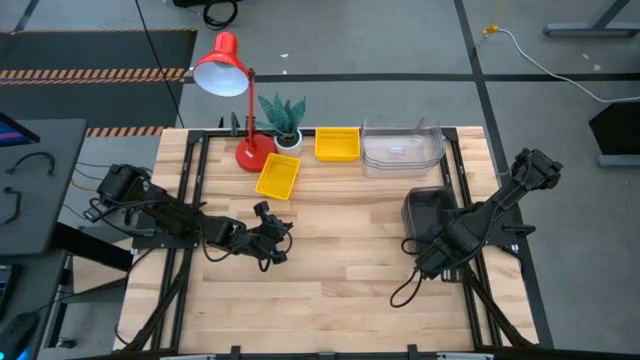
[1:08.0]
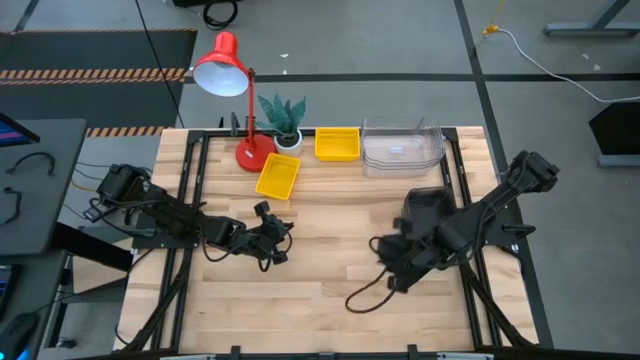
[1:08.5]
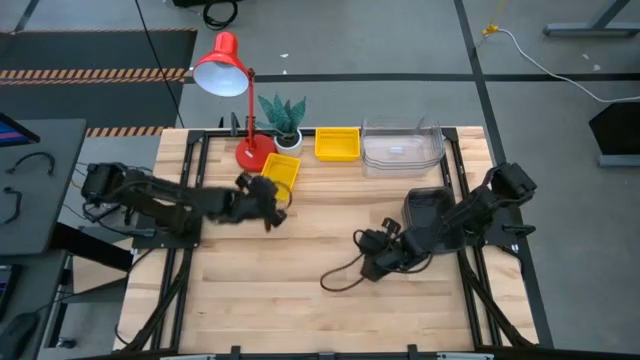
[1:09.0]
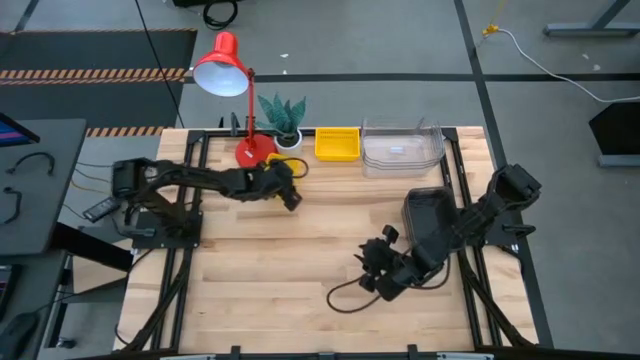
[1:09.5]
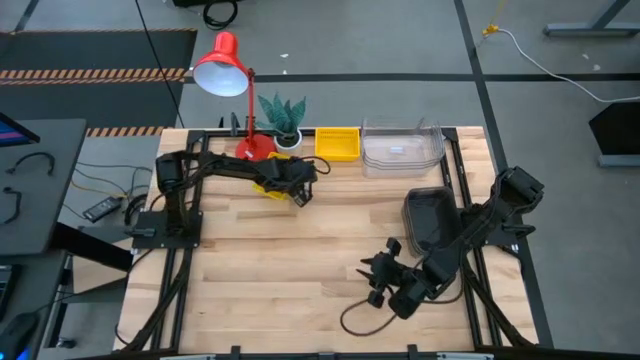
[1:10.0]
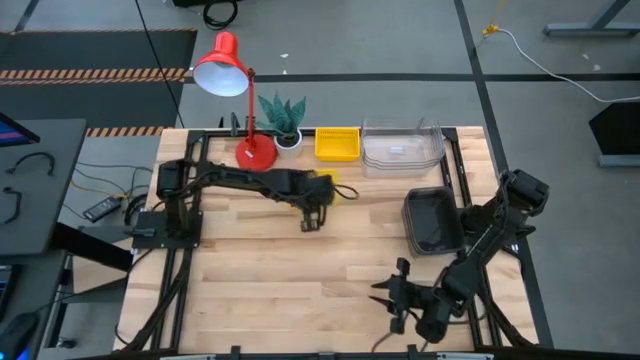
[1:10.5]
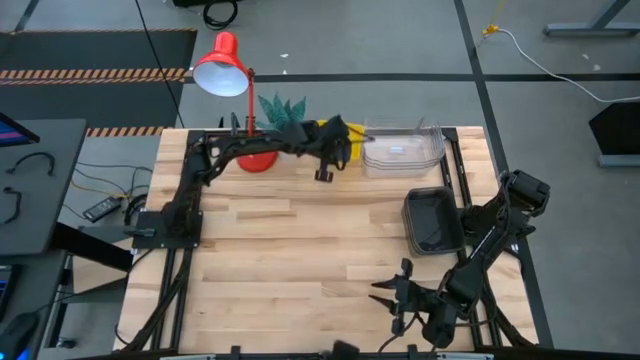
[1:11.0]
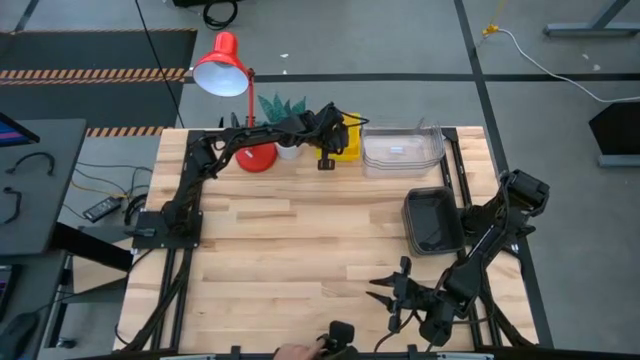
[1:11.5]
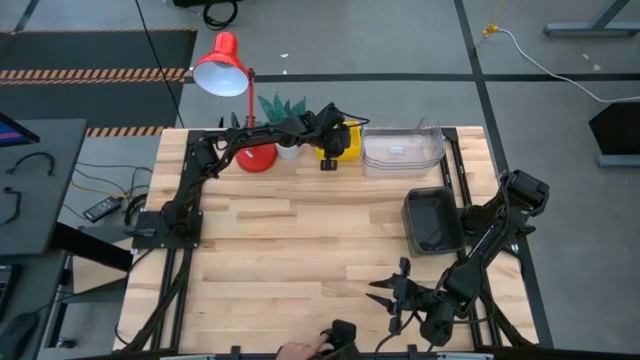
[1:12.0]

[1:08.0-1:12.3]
Stack the bottom yellow bin on top of the top yellow bins

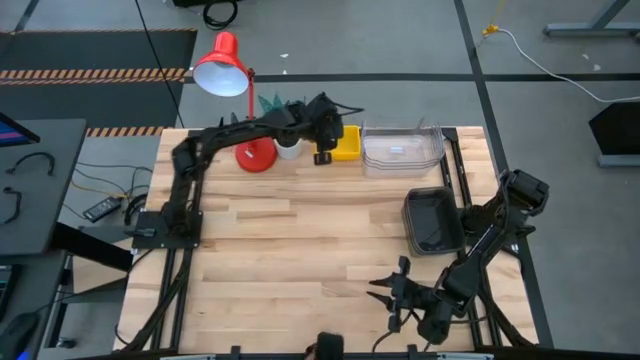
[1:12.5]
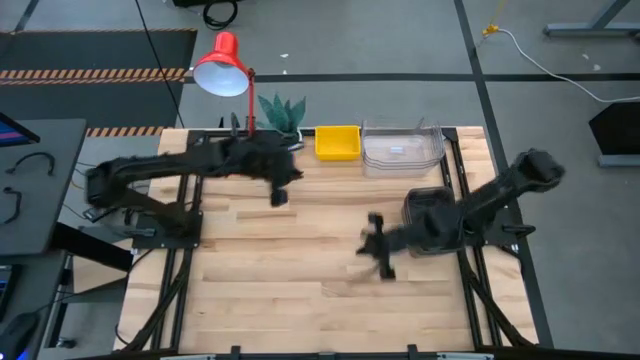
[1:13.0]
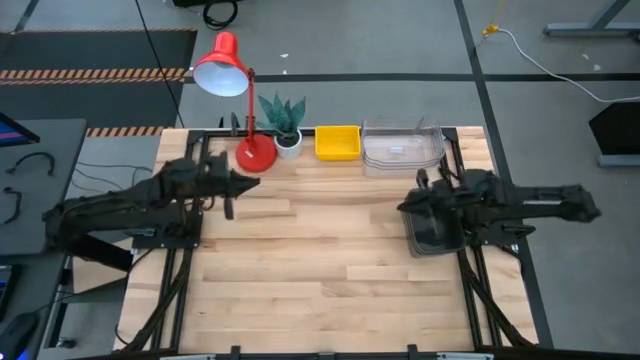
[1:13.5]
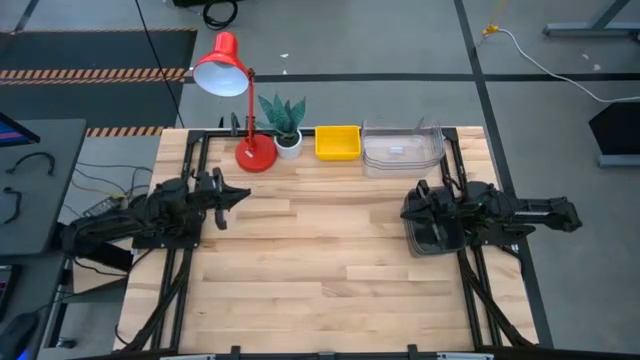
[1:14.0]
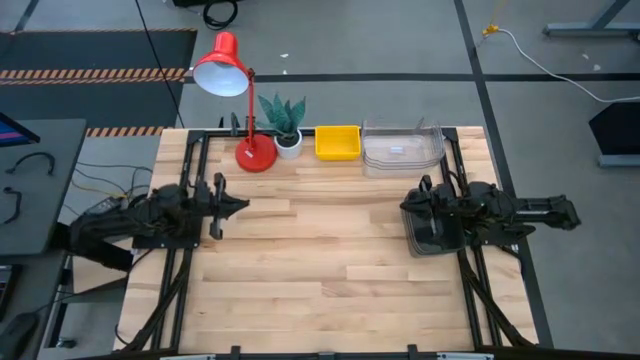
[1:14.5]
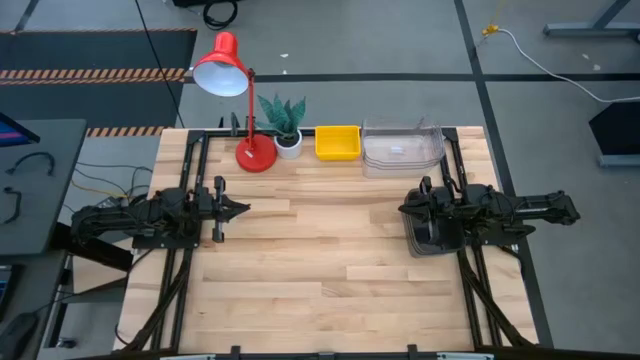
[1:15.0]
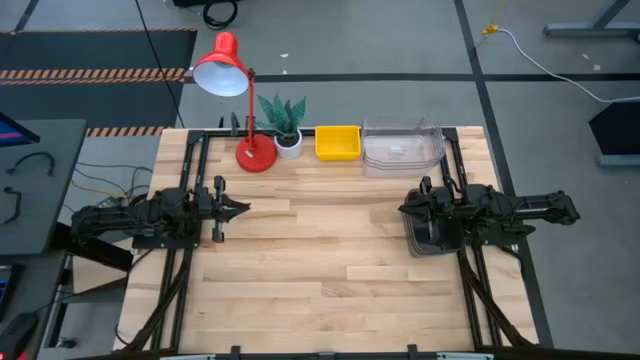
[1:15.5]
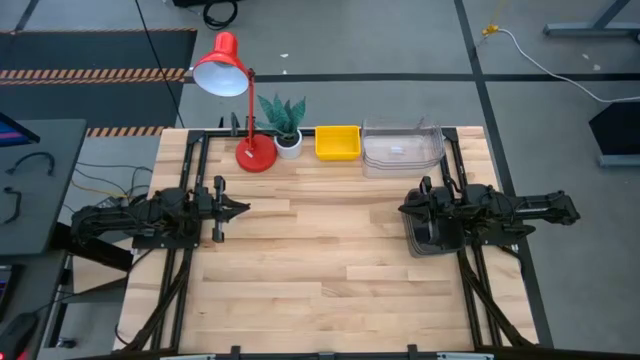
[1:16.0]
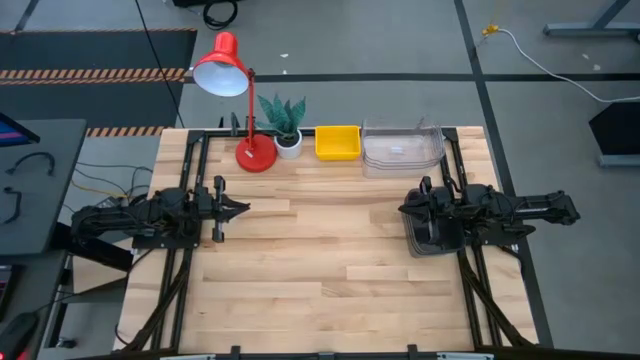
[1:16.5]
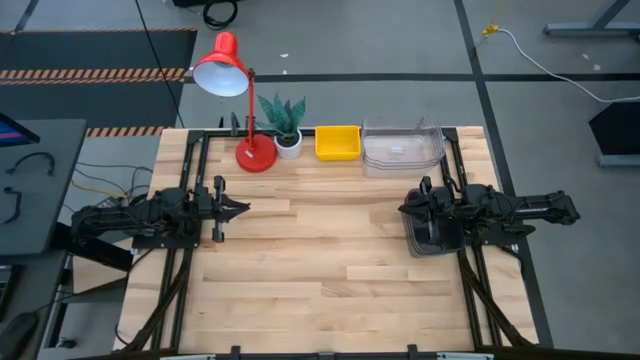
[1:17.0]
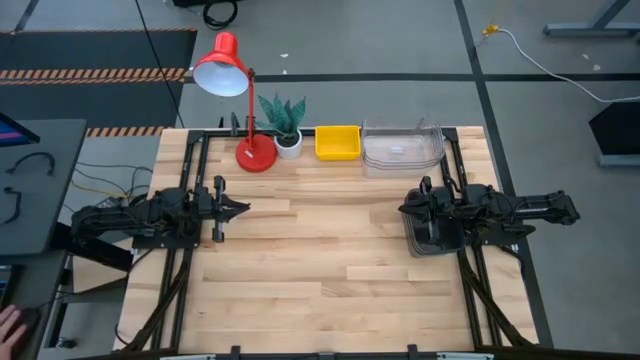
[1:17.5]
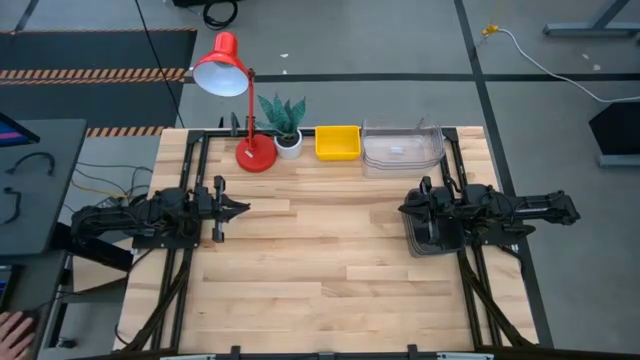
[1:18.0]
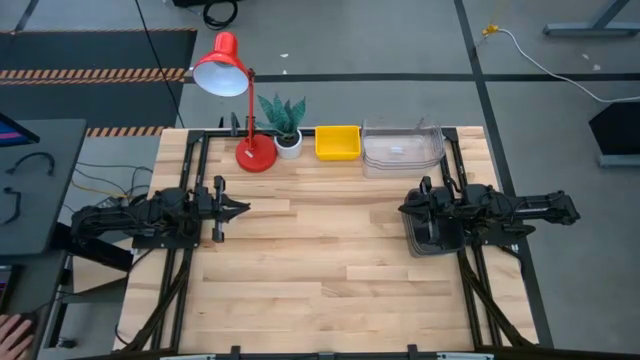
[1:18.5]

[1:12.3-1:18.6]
Return to Home Position
